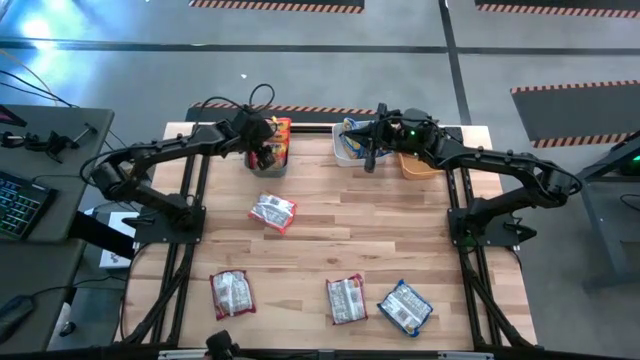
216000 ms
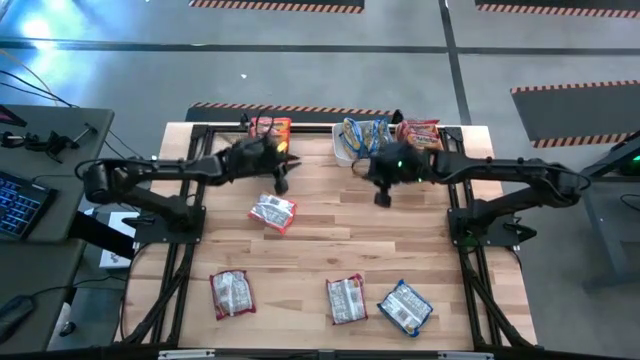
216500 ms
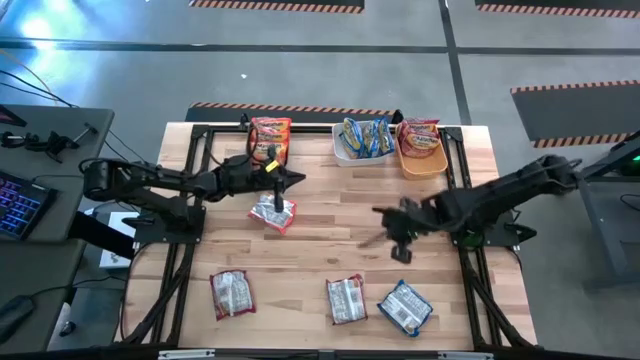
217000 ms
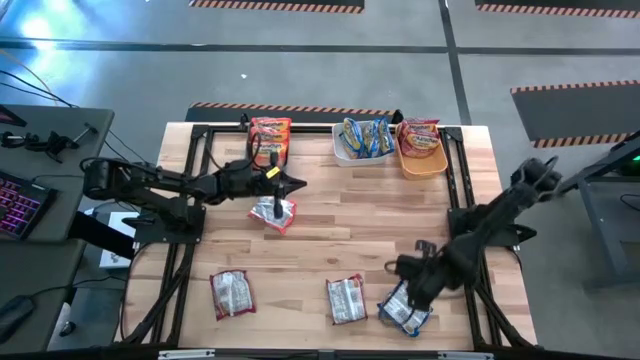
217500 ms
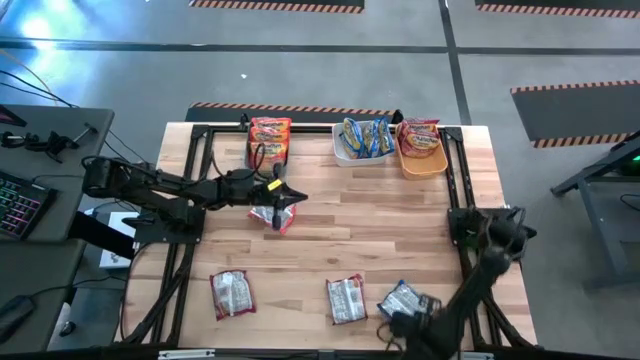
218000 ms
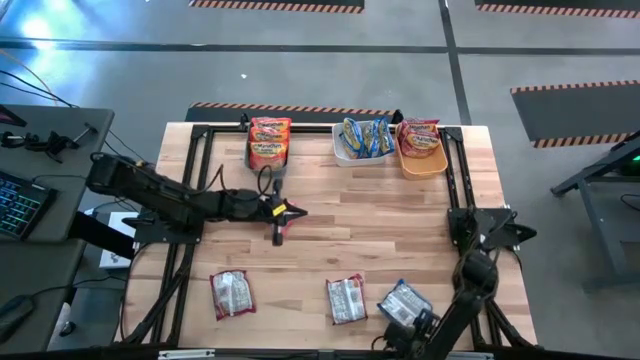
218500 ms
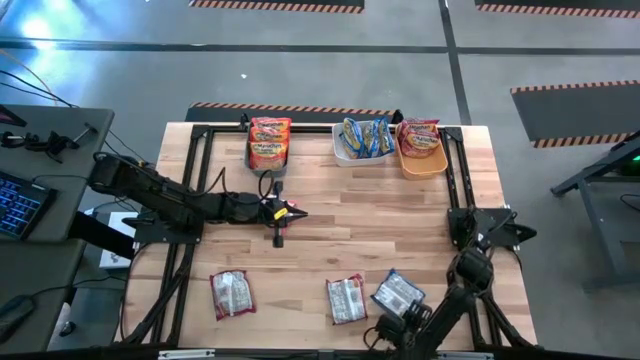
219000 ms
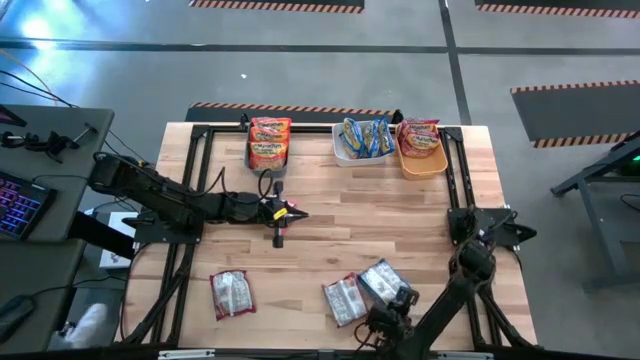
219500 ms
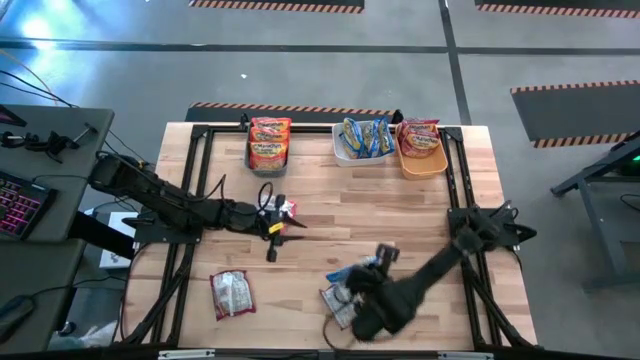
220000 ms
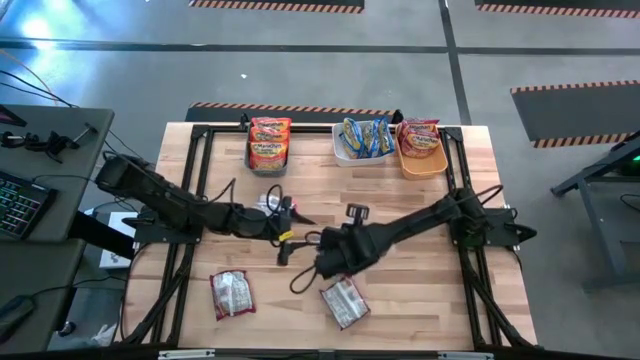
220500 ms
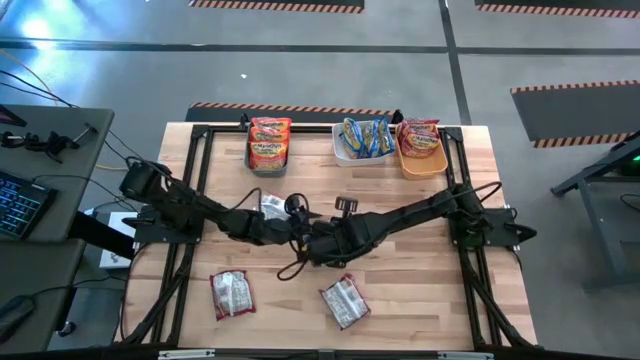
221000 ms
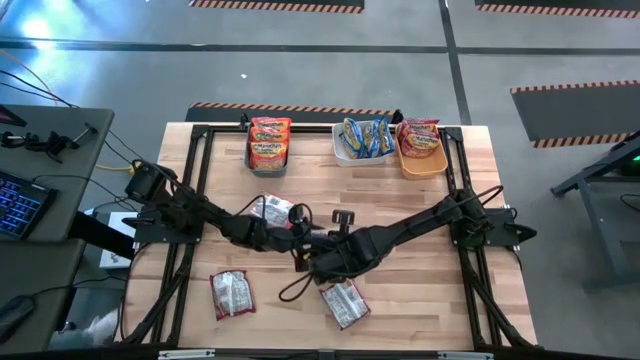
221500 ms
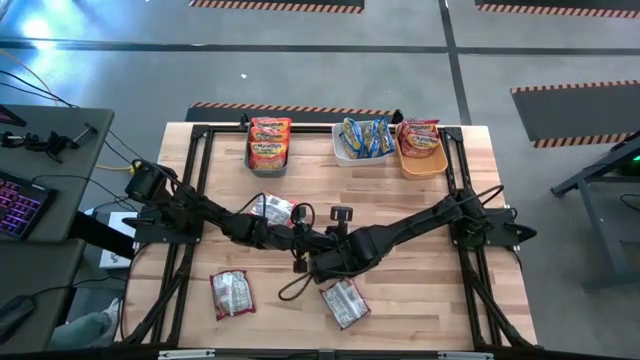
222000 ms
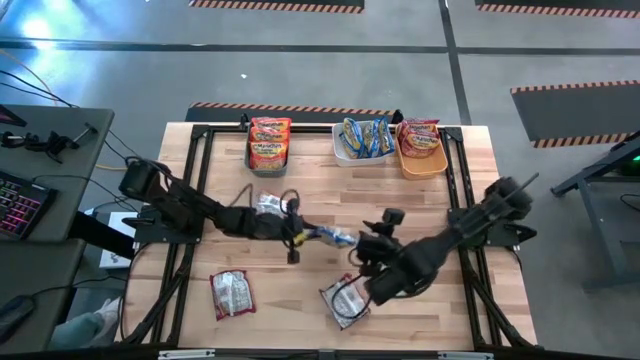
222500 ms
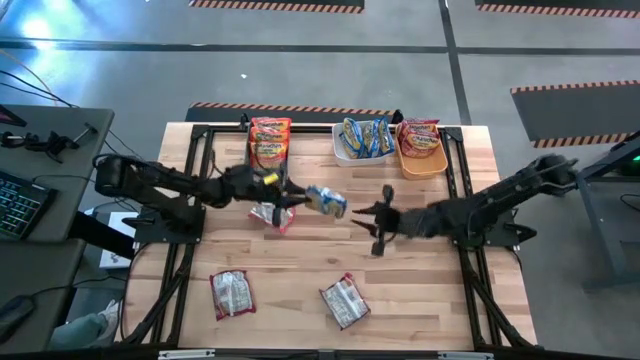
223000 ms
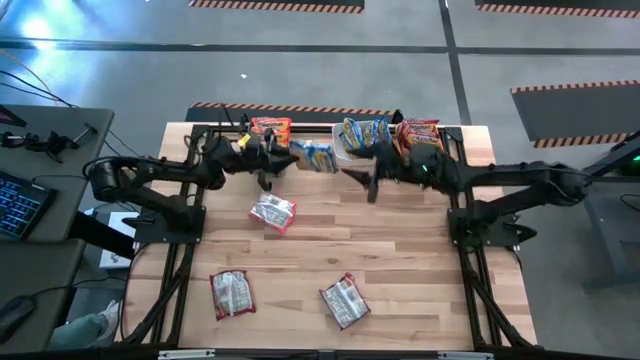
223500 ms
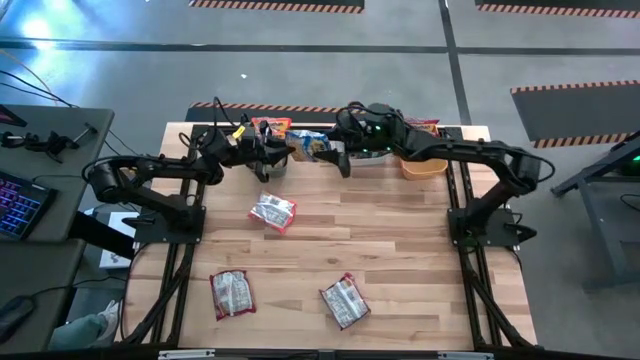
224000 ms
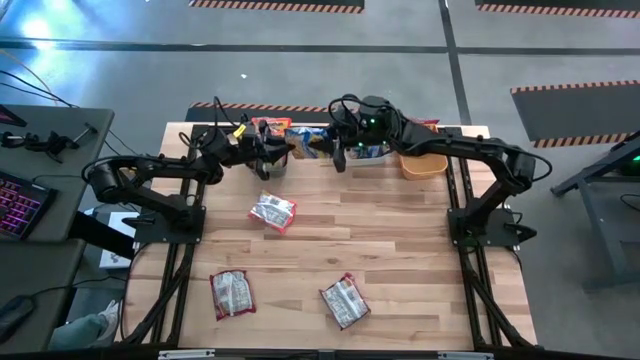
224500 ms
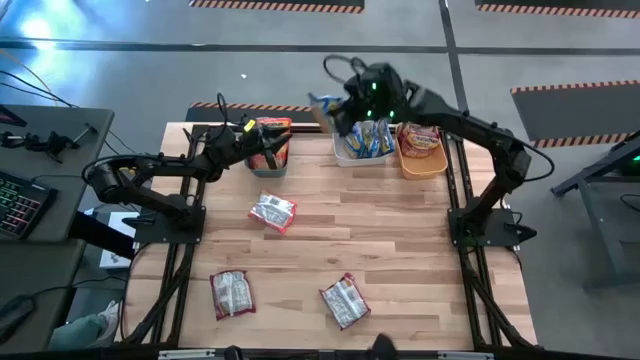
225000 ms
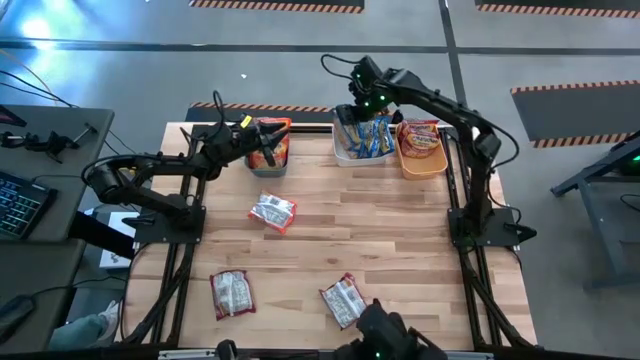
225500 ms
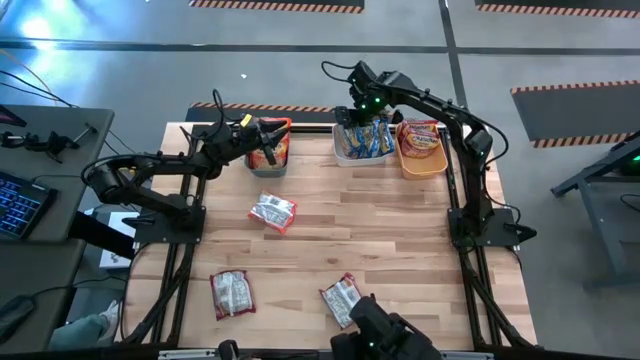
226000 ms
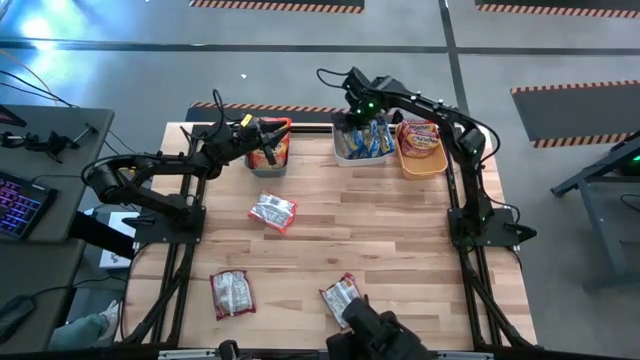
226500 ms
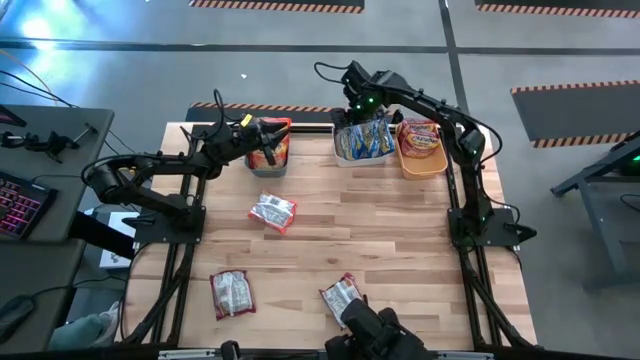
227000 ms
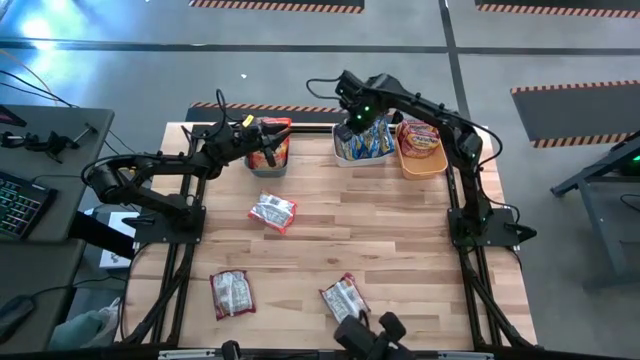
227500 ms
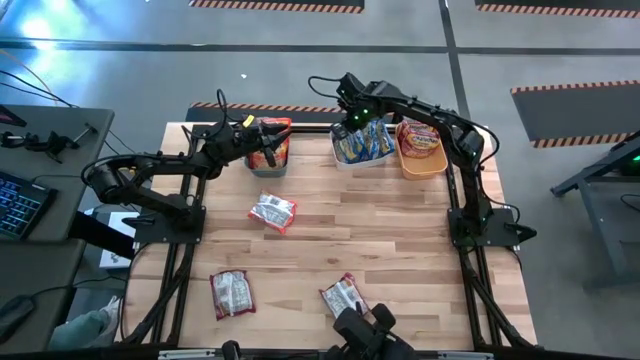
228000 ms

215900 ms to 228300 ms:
Task: Sort Maruchan noodles
Put the blue noodle pack into the white bin

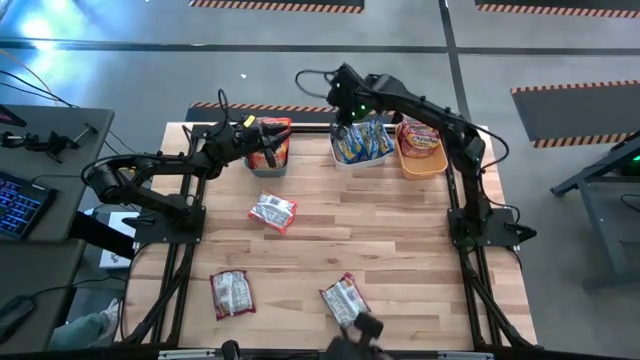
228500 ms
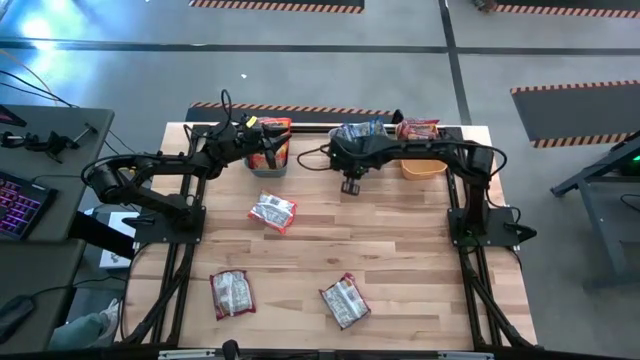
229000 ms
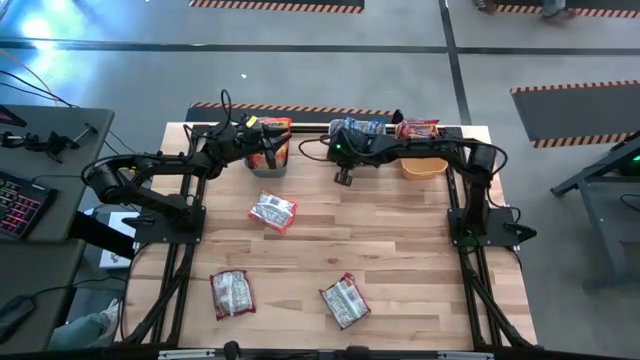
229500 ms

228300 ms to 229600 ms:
Adjust the white bin

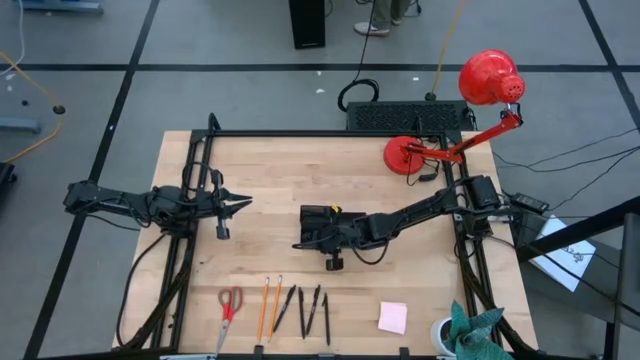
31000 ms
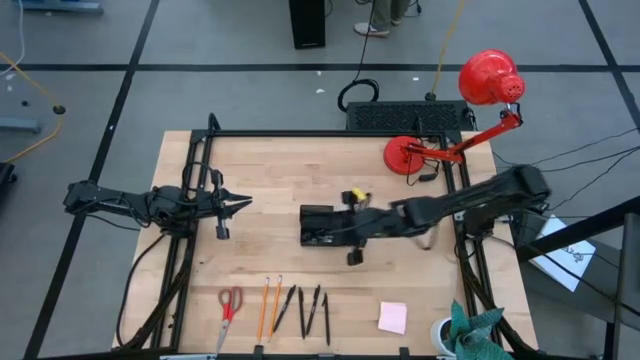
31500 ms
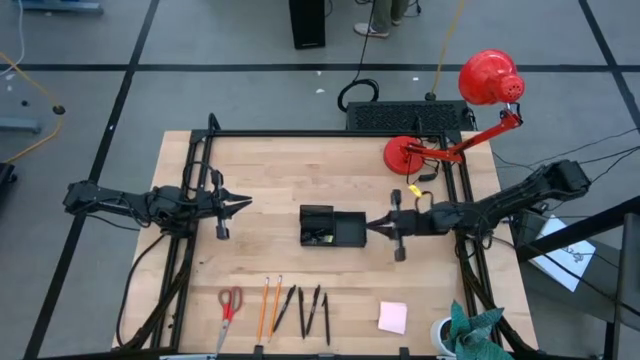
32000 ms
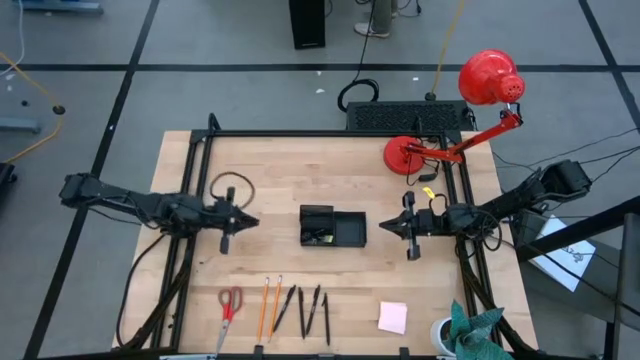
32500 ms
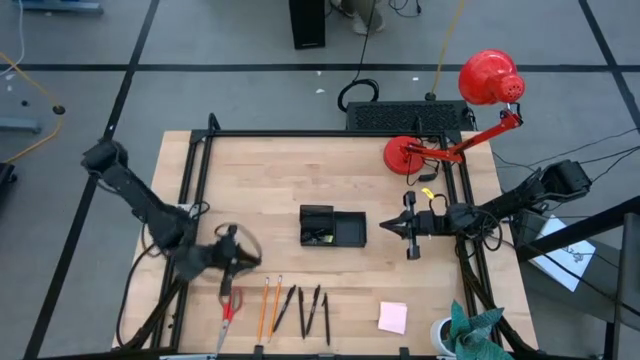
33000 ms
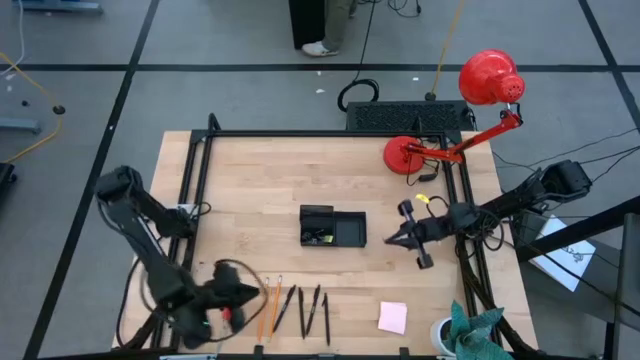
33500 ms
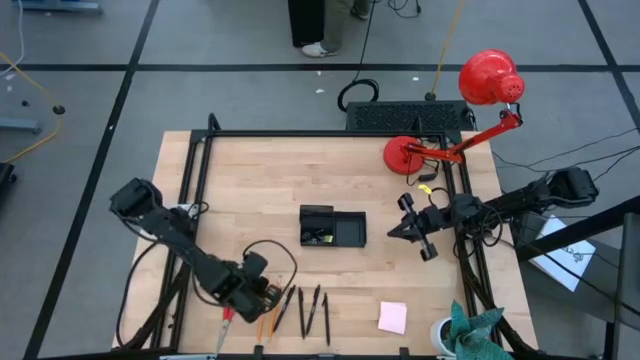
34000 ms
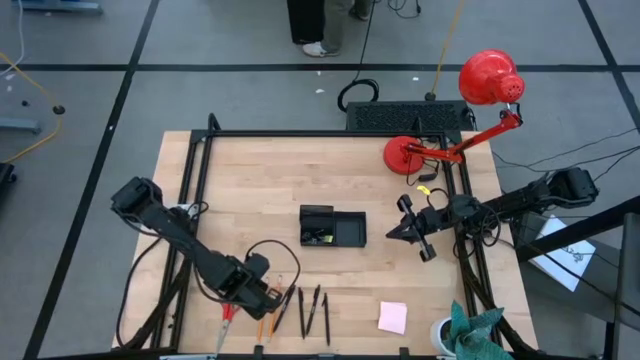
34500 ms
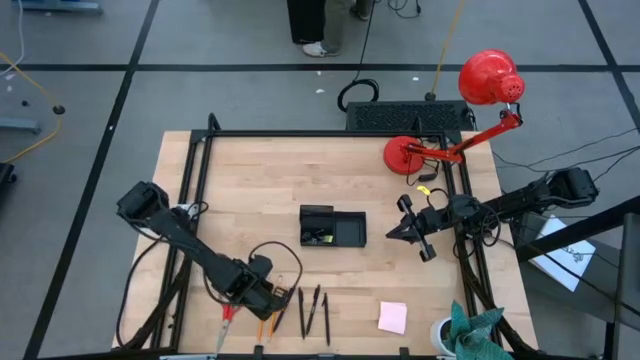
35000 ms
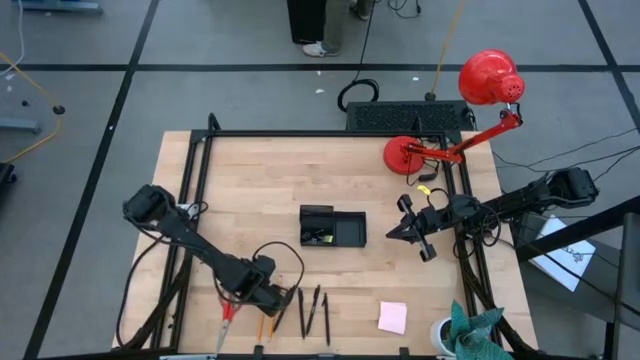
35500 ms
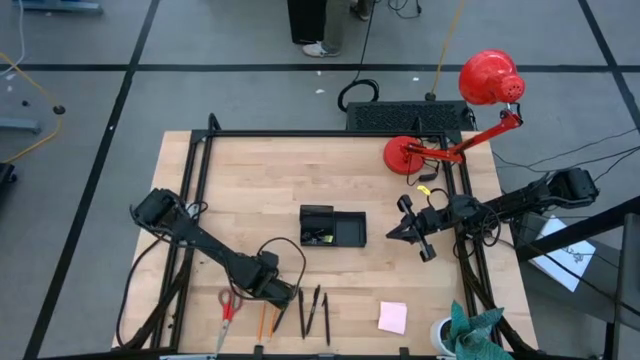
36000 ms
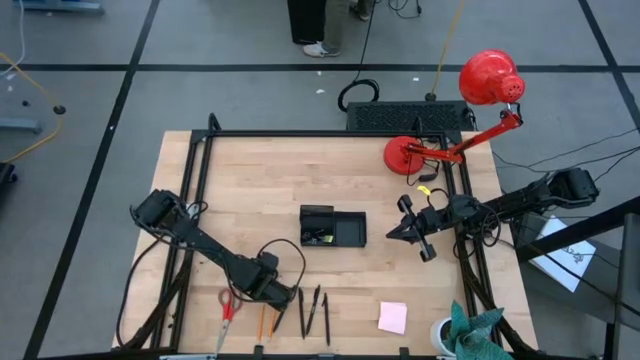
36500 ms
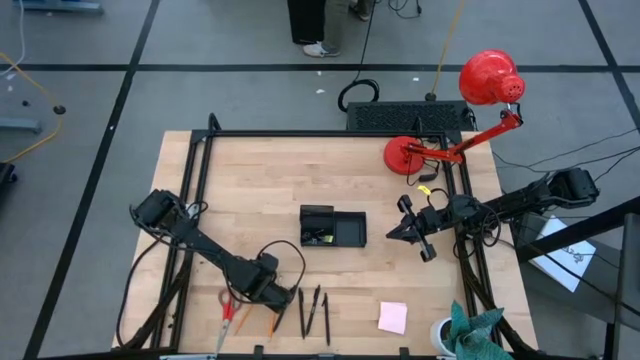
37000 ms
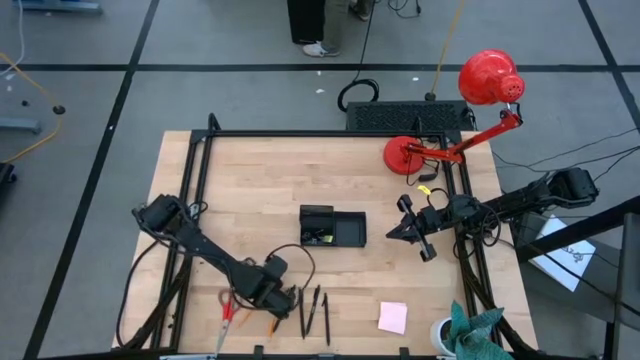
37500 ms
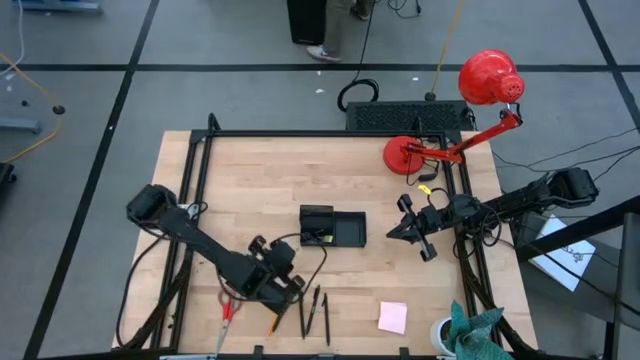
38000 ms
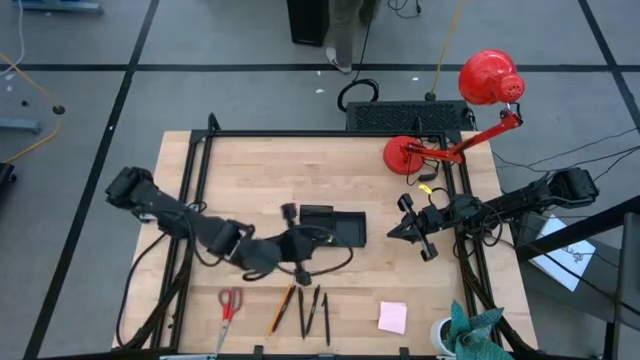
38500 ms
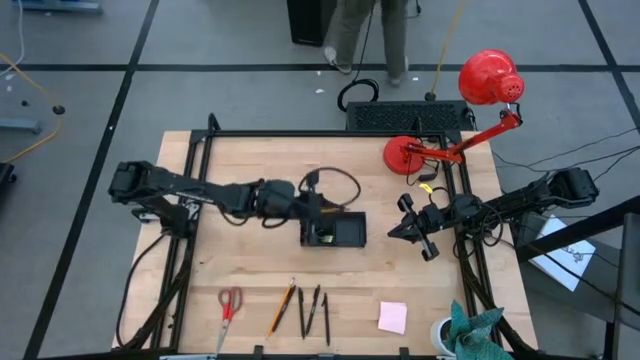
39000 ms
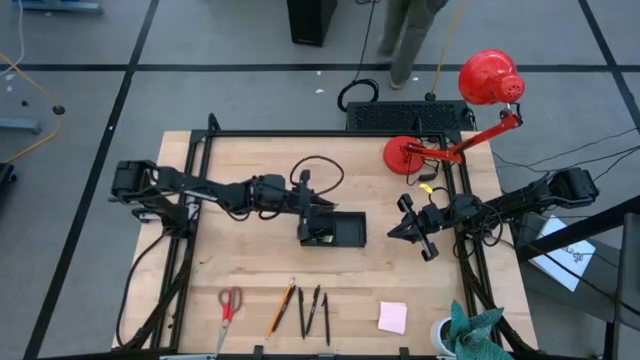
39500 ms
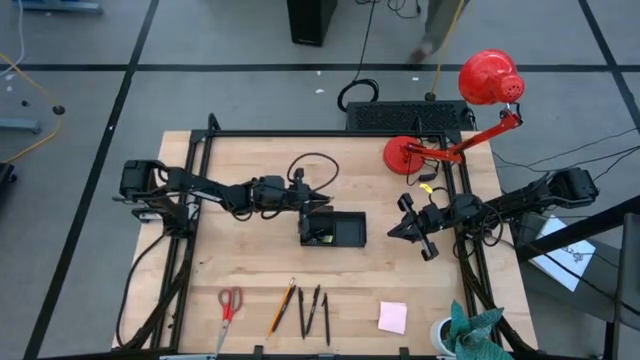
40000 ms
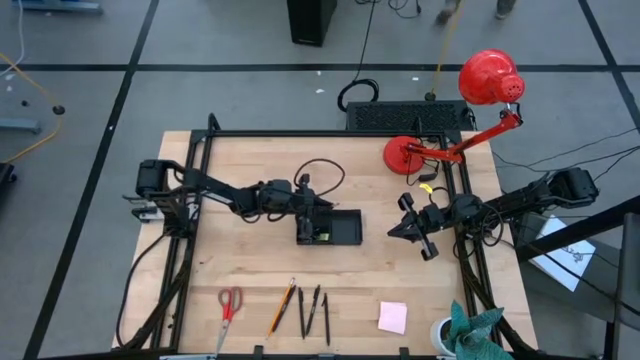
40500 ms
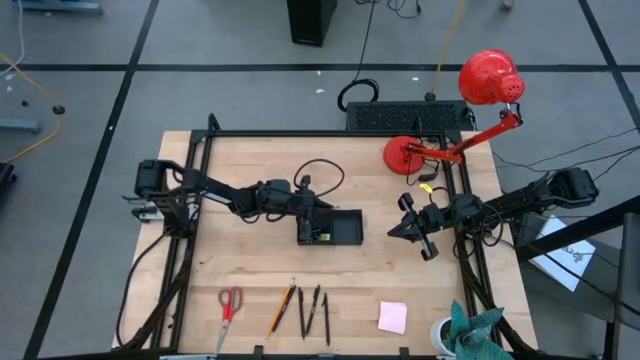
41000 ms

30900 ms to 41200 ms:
Task: Pick and place office supplies into organizer
Put the left yellow pencil into the desk organizer
